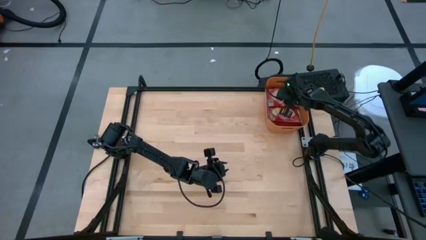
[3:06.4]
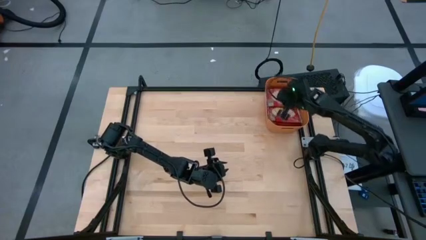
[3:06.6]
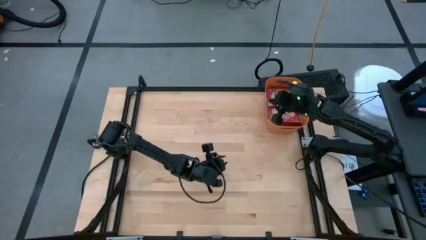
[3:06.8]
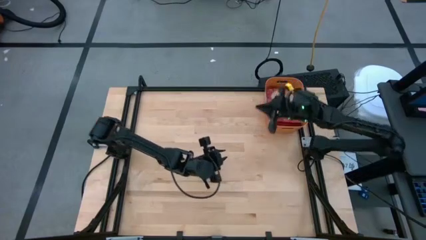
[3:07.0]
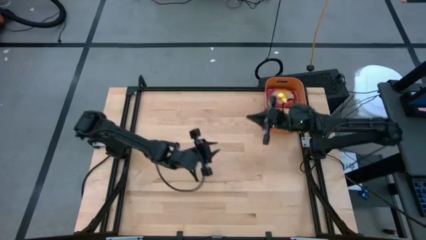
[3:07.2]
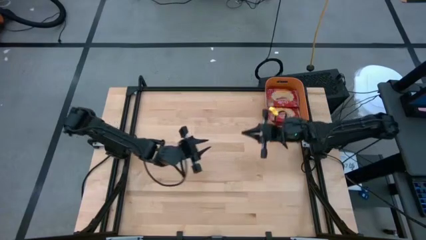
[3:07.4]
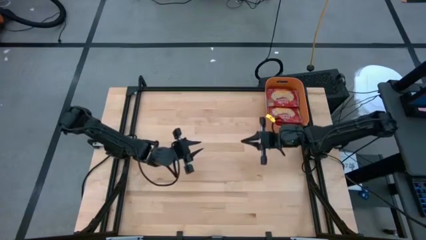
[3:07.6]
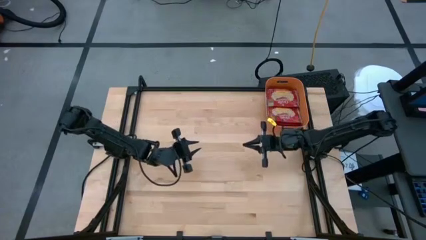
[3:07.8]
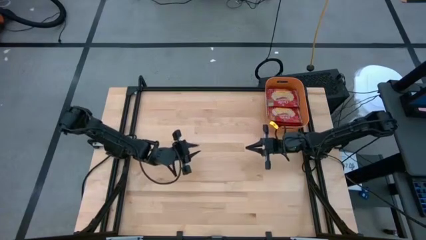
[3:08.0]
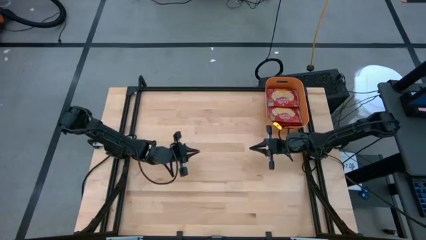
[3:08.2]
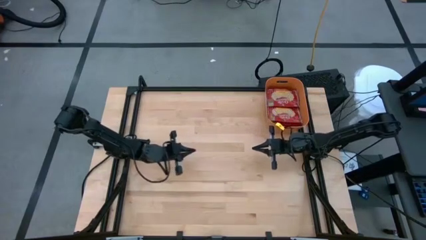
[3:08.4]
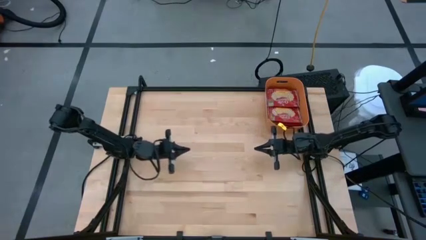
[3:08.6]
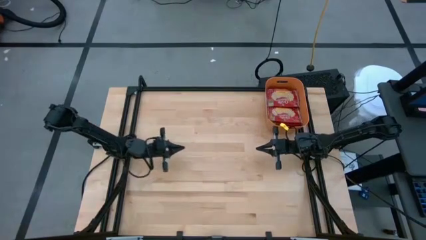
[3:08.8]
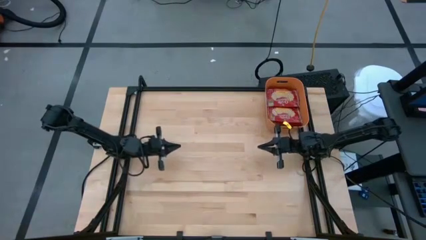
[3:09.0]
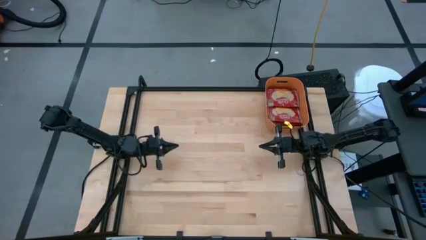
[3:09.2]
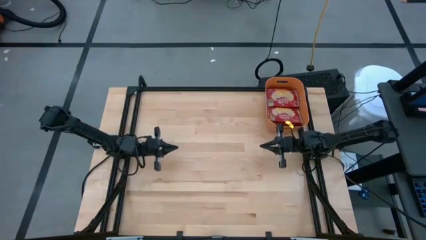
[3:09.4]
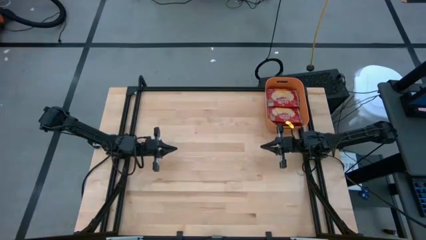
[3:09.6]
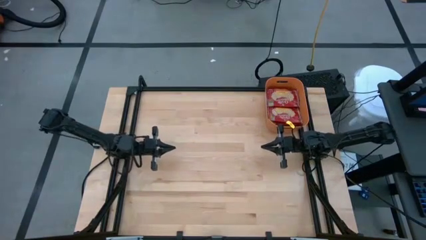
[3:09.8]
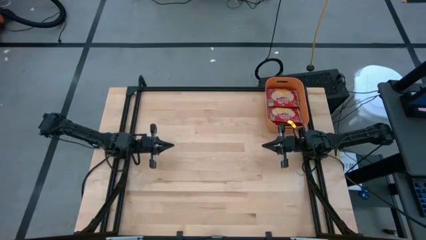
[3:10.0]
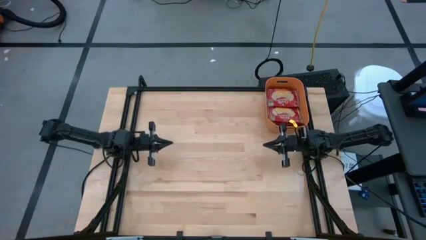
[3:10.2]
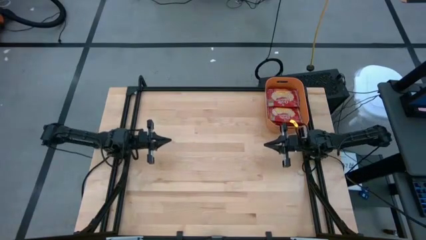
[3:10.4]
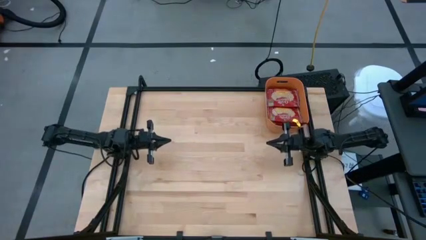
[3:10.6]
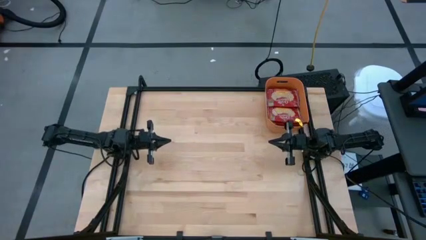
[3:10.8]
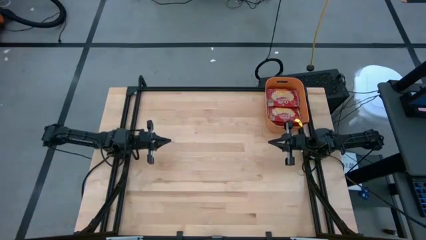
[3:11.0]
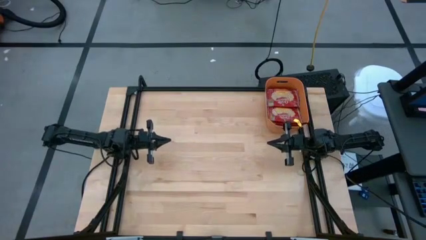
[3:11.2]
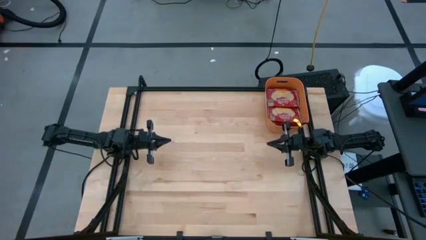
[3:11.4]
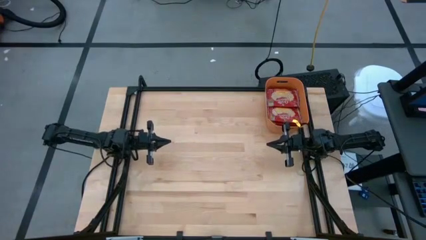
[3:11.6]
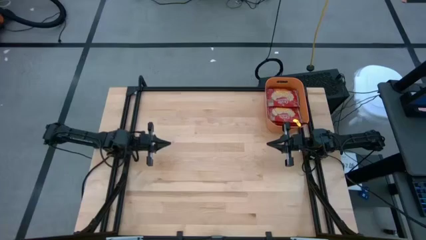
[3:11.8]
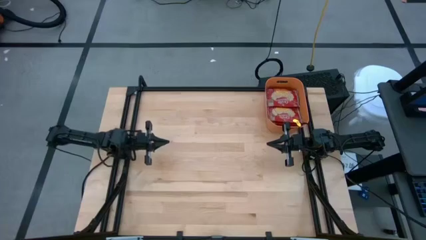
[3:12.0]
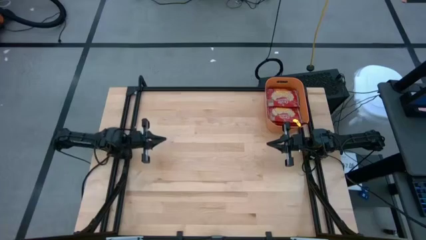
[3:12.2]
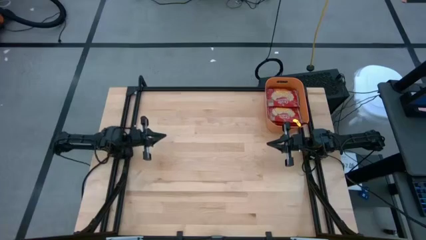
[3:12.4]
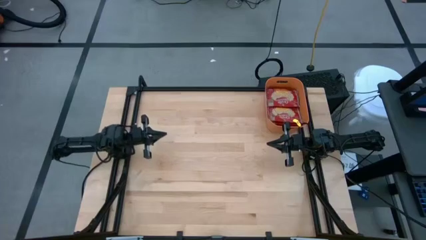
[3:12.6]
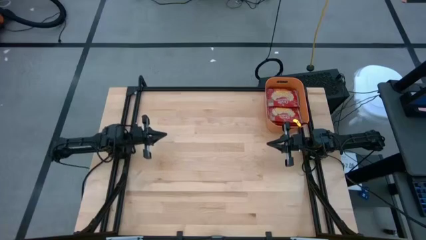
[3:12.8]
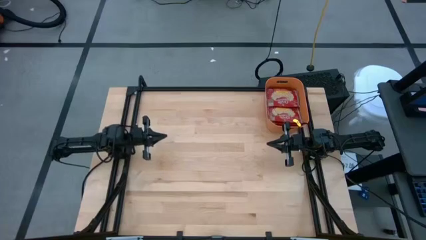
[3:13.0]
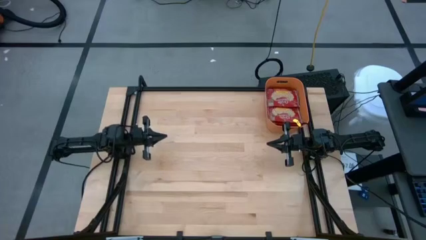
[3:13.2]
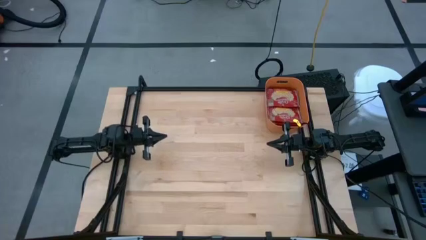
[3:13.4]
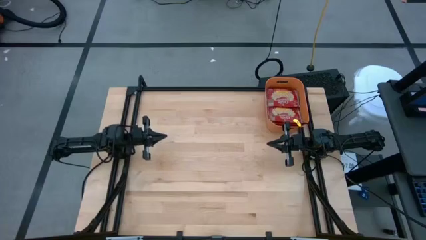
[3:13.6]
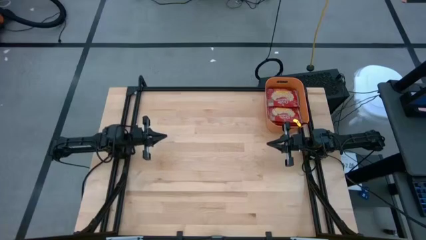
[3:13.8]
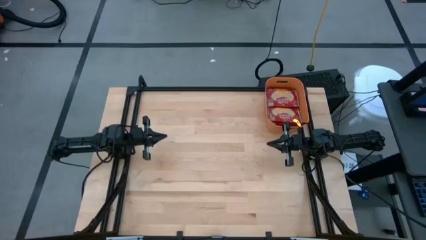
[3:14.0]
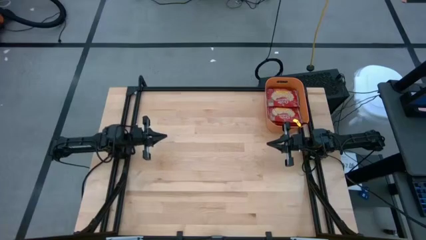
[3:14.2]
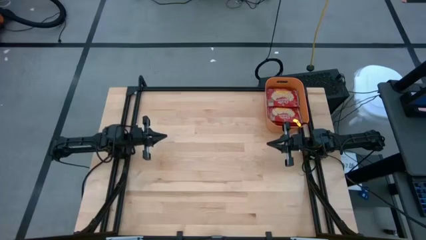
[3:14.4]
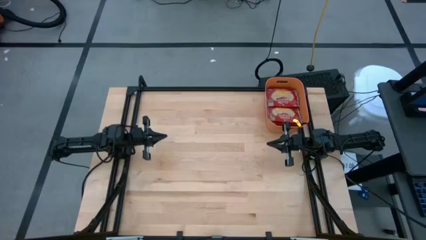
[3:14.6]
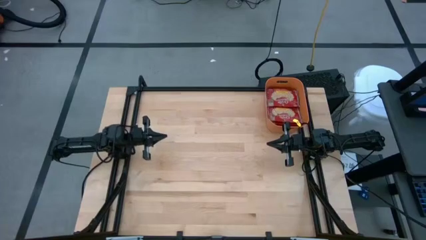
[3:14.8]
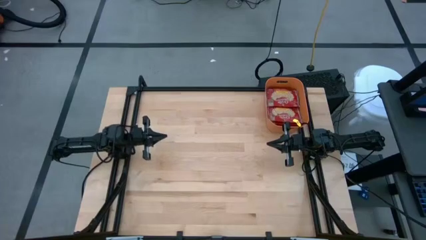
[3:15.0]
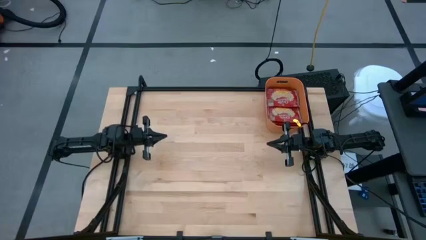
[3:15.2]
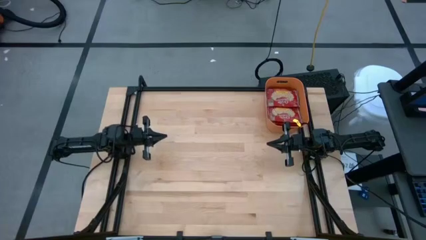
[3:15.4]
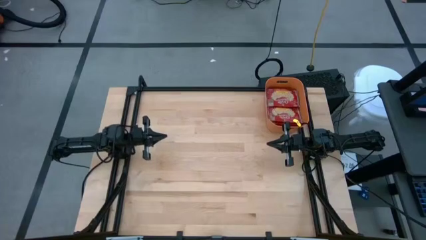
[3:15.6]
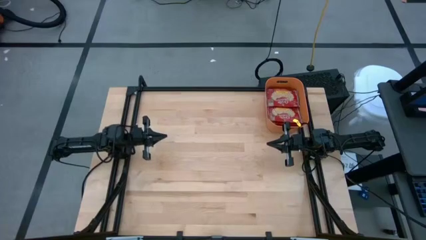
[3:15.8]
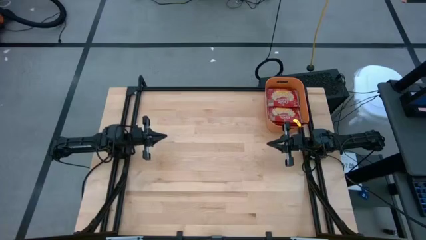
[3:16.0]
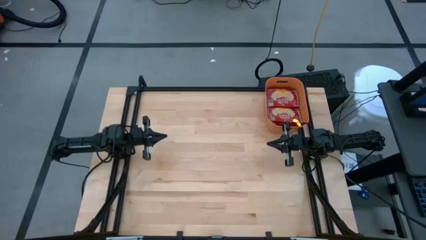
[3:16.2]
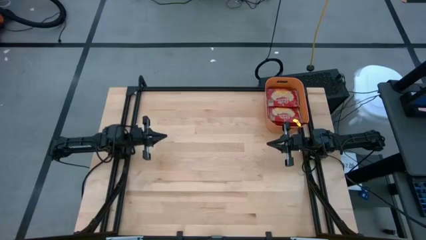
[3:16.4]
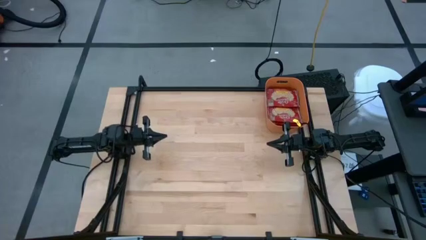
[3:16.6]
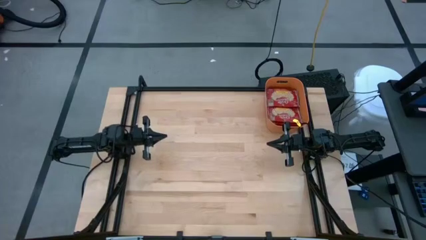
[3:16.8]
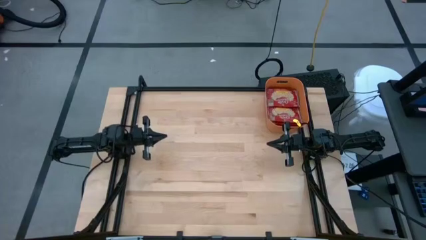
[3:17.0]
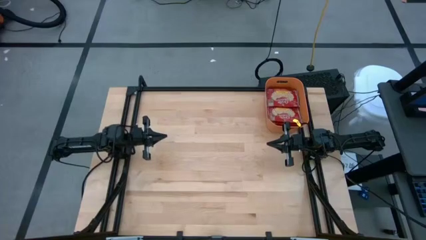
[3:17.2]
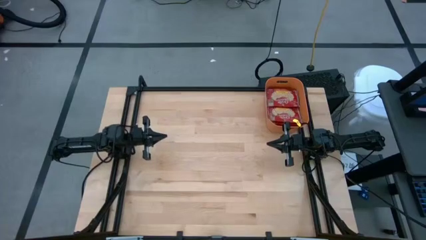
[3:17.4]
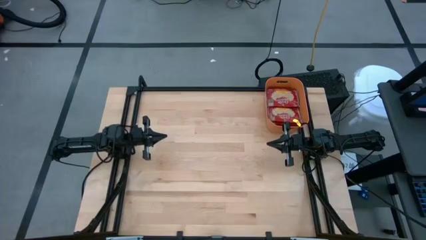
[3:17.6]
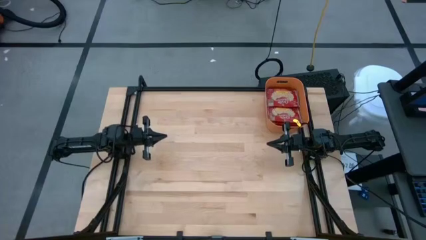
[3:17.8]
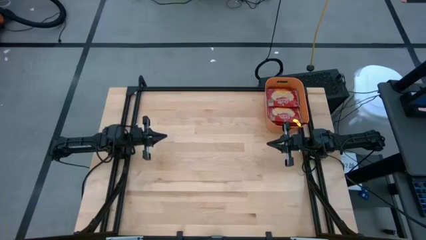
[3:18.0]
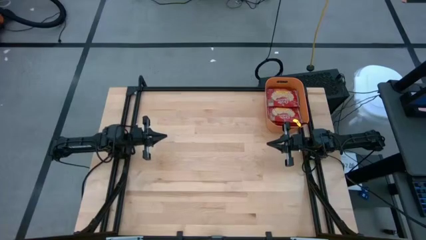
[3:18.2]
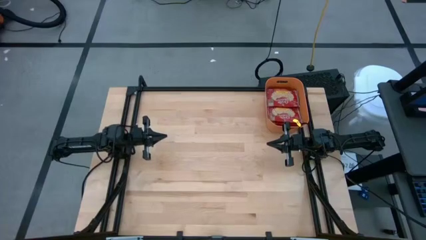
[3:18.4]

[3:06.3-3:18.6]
Task: Sort popcorn bags into baskets
Return to Home Position

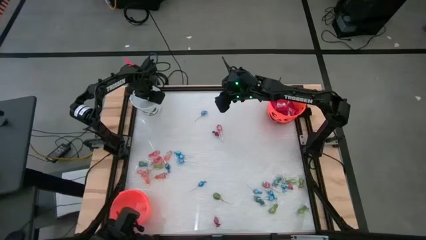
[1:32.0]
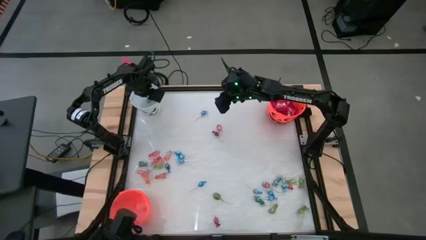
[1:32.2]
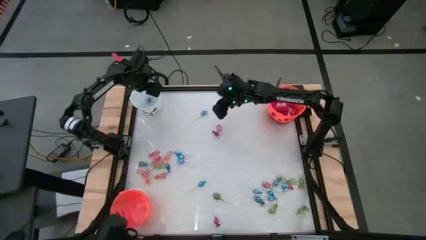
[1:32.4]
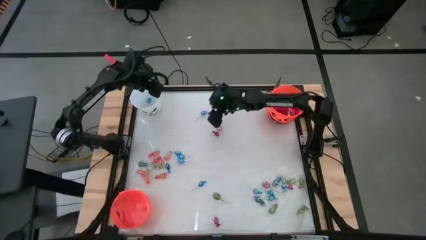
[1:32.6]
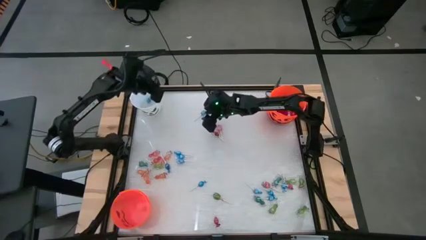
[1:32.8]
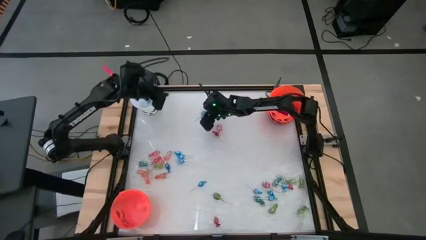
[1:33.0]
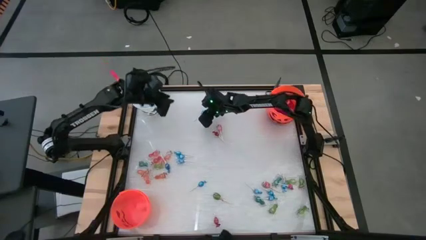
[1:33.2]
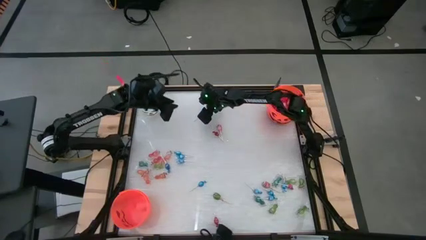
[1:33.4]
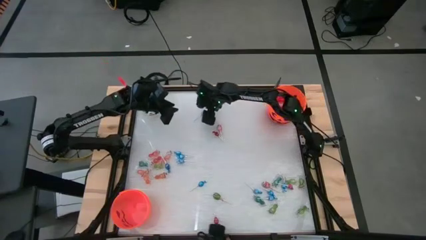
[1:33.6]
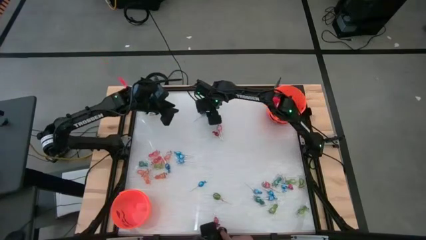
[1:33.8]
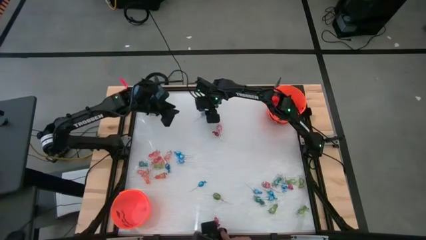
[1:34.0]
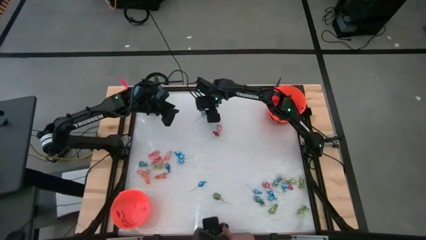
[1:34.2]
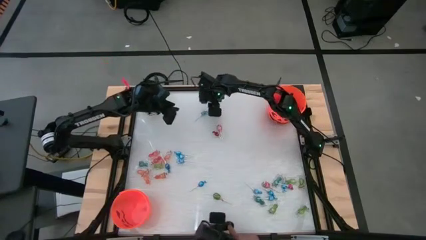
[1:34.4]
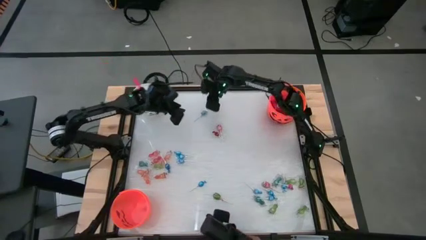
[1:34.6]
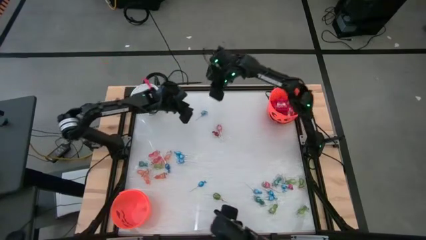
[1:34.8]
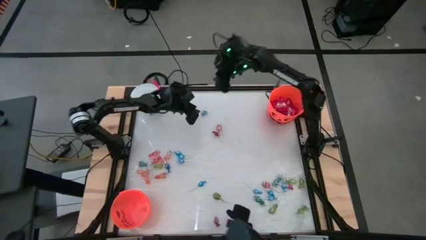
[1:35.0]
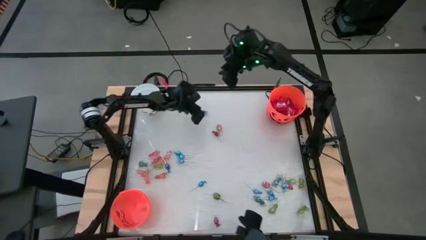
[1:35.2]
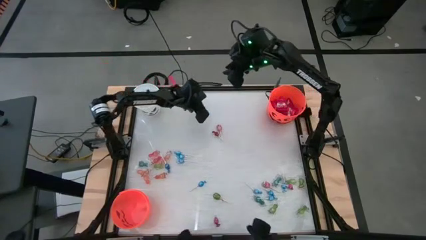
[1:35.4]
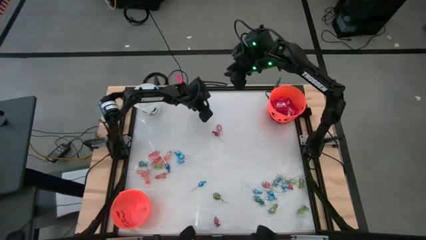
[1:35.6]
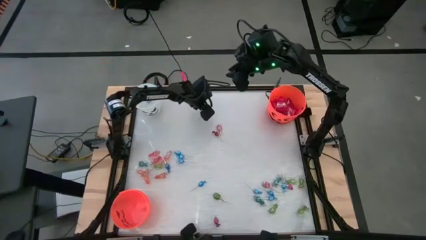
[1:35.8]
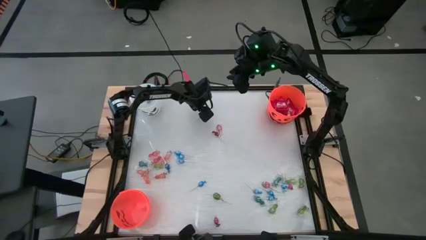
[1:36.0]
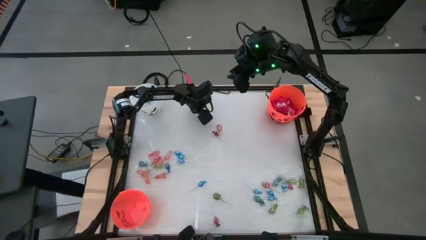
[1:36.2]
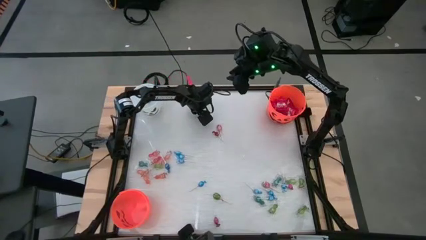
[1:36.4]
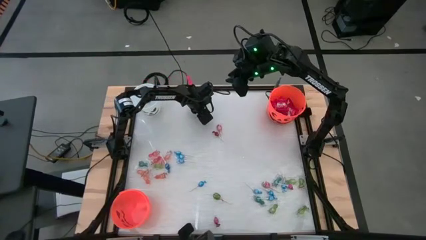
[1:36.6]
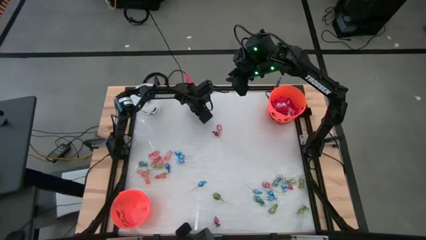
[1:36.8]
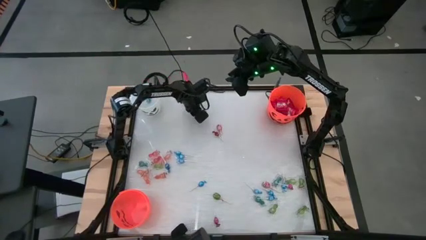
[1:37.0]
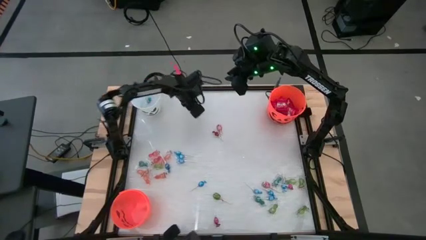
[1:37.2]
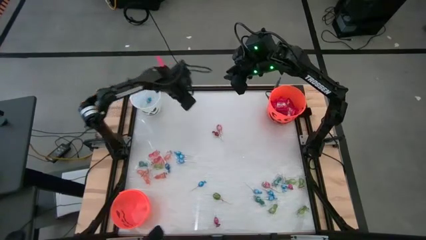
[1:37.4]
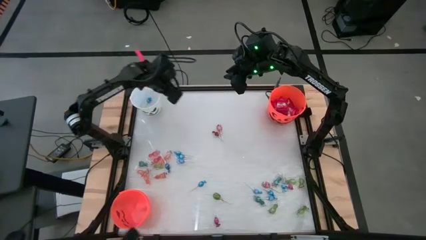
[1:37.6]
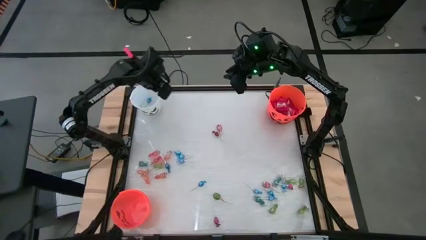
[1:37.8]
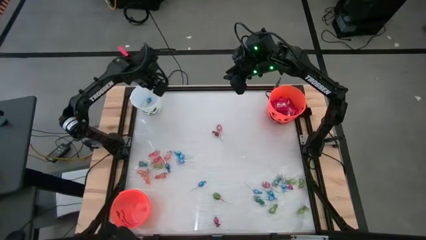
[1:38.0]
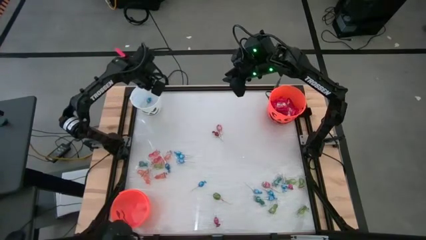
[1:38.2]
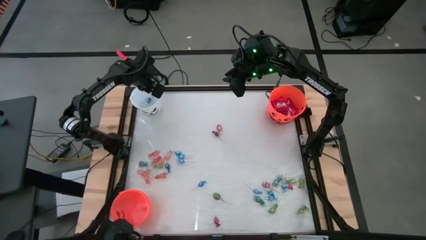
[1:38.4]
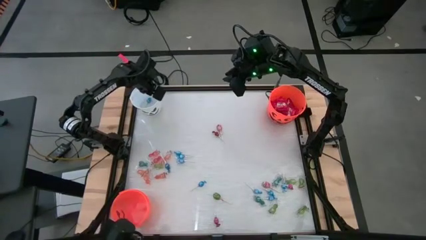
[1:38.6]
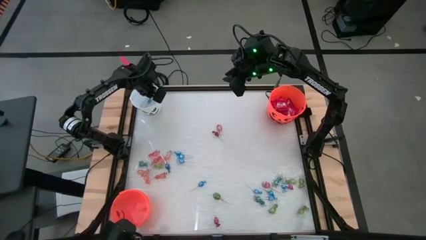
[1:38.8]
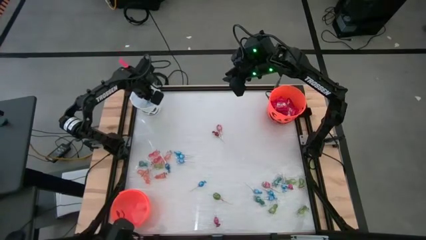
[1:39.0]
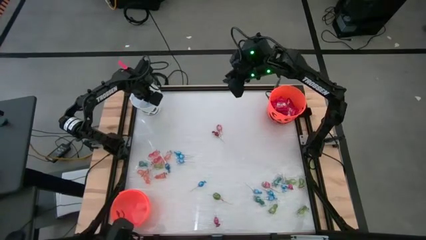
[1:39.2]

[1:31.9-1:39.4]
Task: Sort candy by brand, put in halloween buckets
Put the blue lollipop into the white bucket
